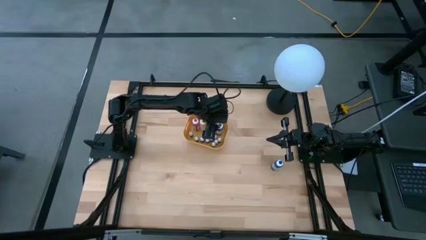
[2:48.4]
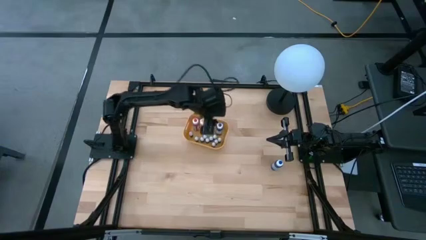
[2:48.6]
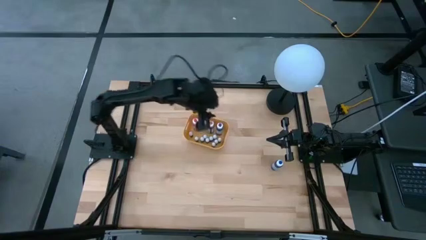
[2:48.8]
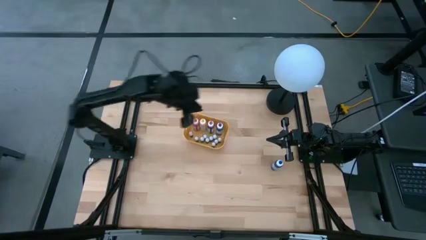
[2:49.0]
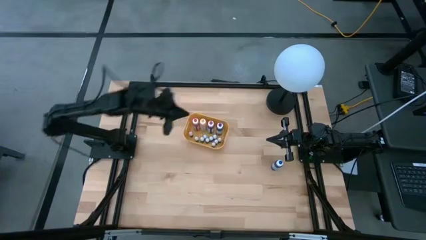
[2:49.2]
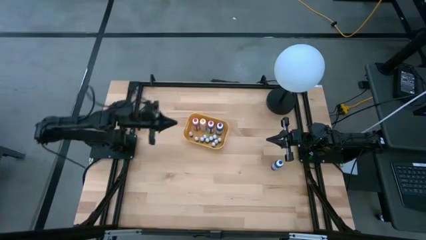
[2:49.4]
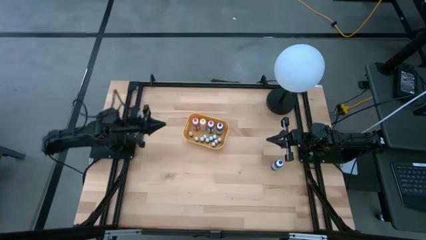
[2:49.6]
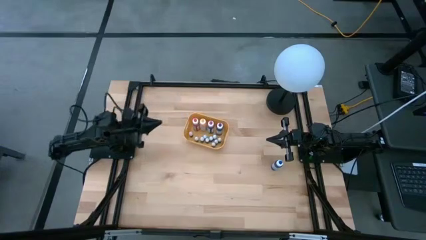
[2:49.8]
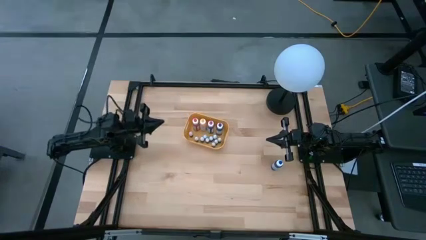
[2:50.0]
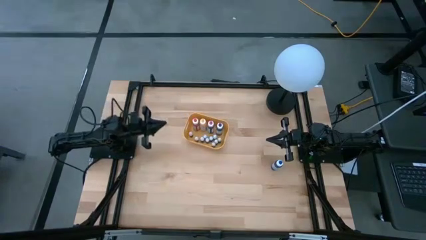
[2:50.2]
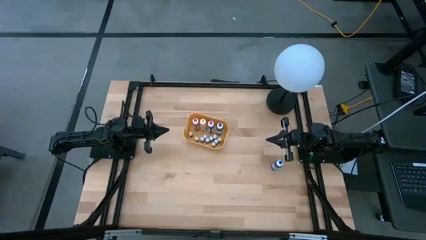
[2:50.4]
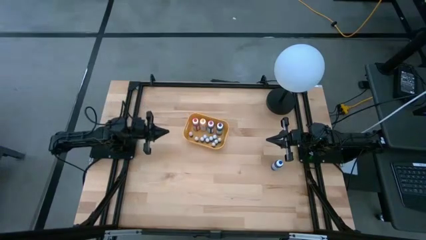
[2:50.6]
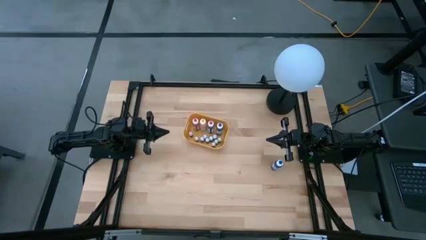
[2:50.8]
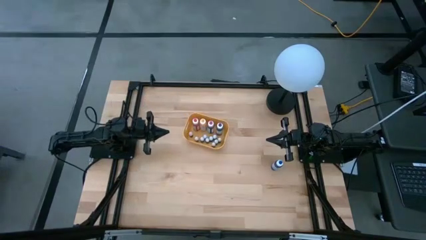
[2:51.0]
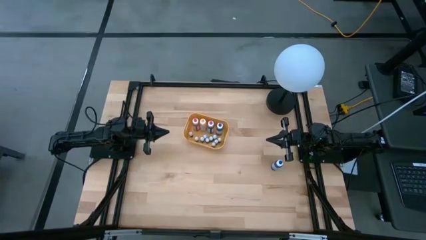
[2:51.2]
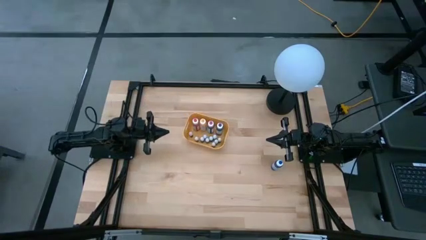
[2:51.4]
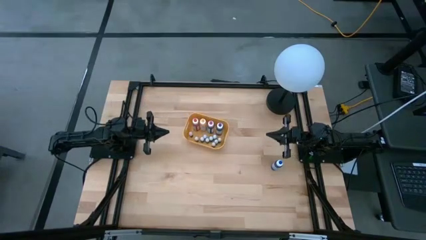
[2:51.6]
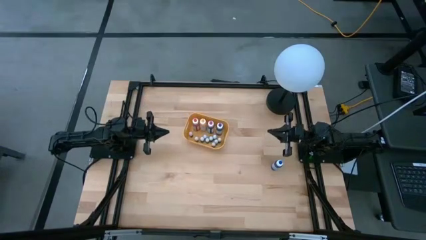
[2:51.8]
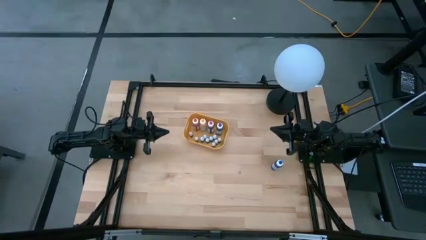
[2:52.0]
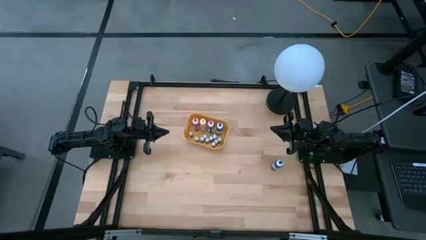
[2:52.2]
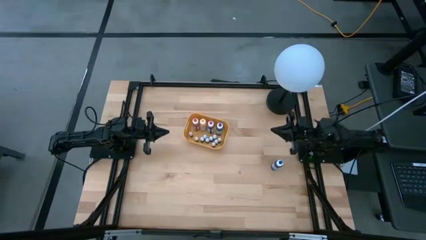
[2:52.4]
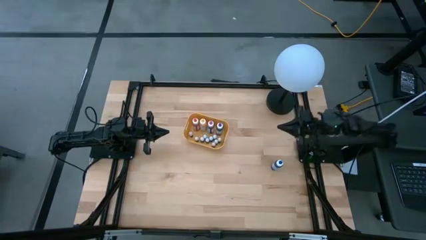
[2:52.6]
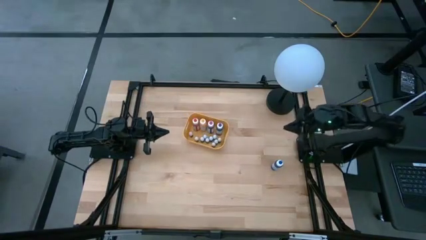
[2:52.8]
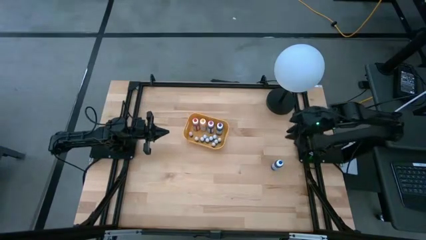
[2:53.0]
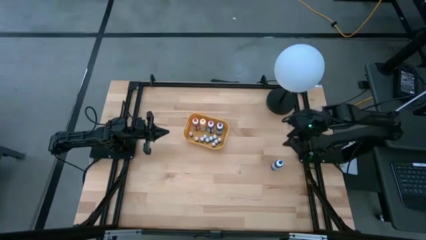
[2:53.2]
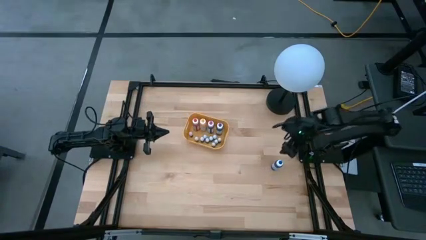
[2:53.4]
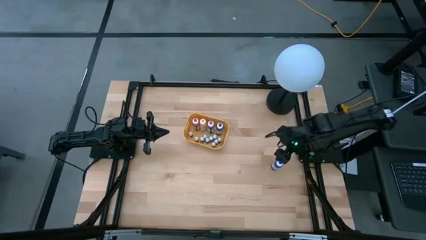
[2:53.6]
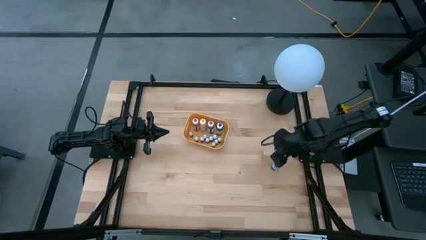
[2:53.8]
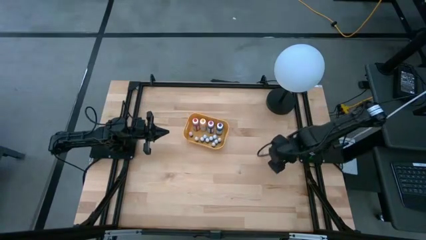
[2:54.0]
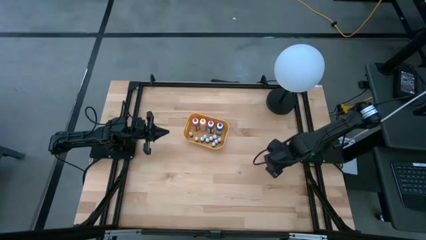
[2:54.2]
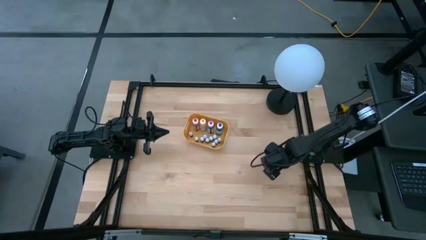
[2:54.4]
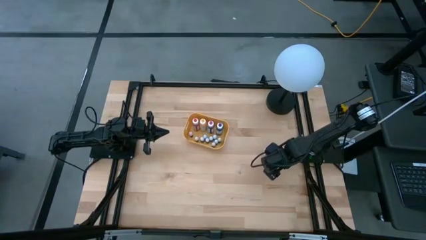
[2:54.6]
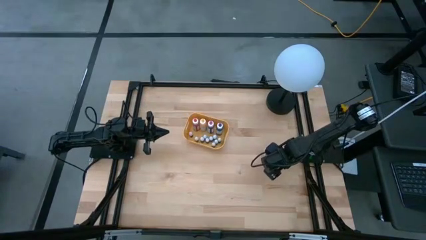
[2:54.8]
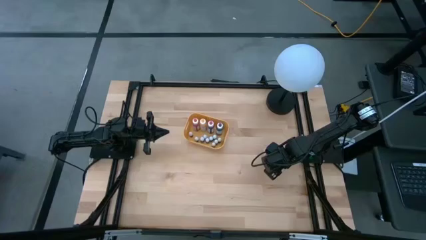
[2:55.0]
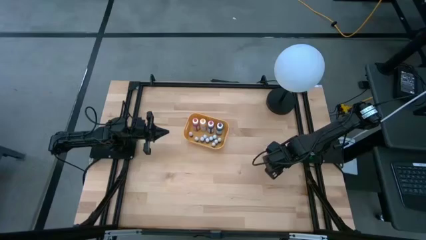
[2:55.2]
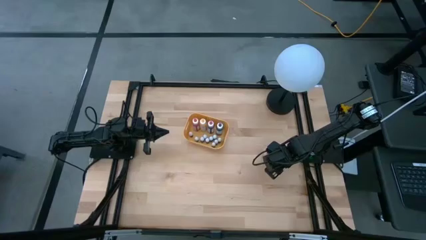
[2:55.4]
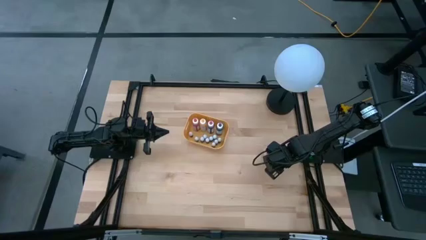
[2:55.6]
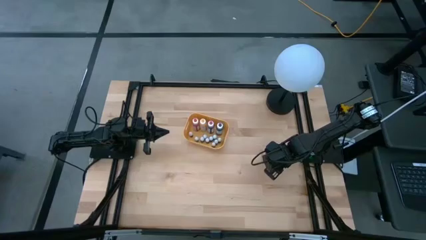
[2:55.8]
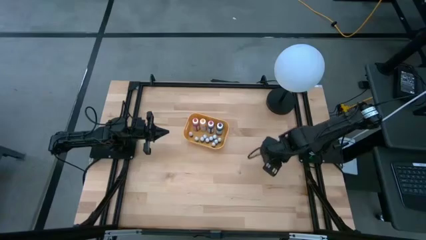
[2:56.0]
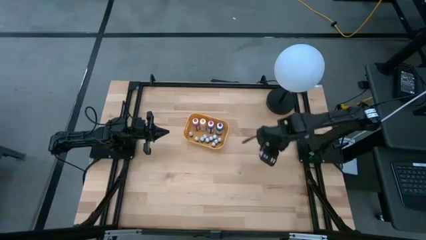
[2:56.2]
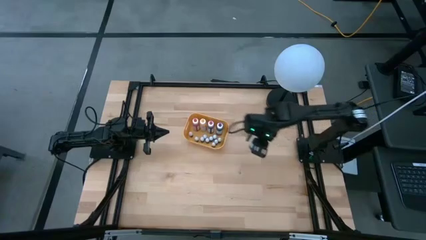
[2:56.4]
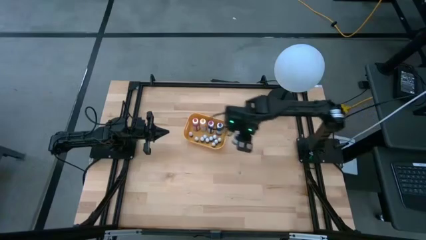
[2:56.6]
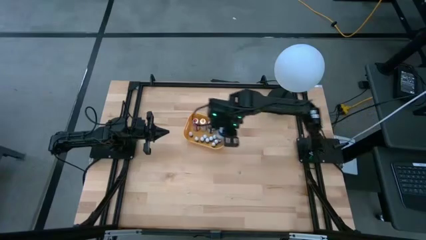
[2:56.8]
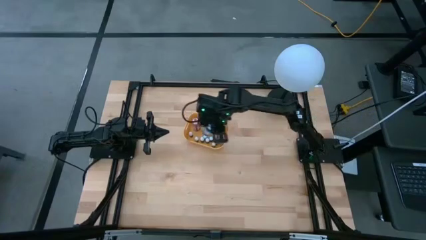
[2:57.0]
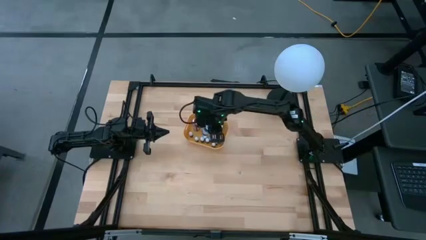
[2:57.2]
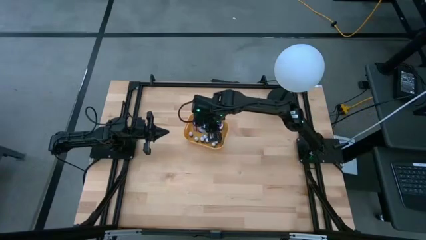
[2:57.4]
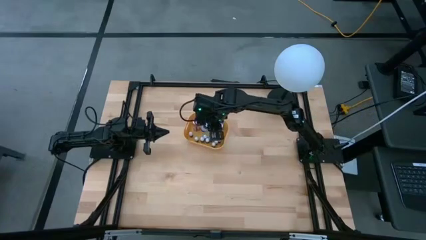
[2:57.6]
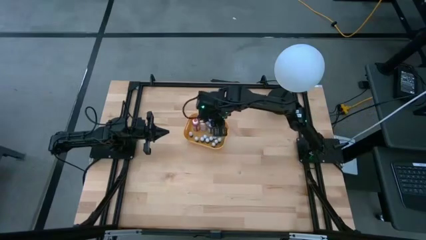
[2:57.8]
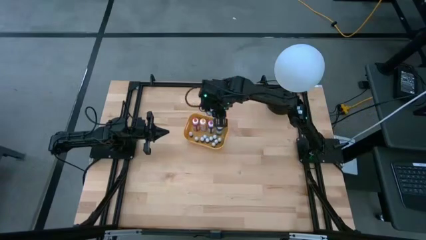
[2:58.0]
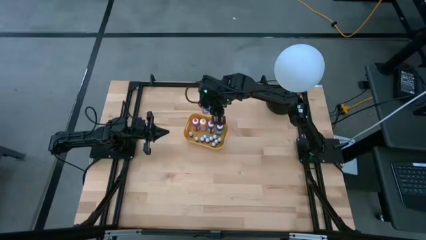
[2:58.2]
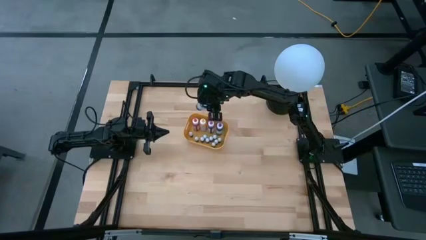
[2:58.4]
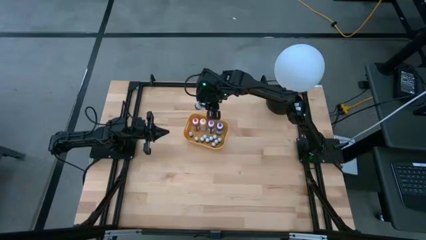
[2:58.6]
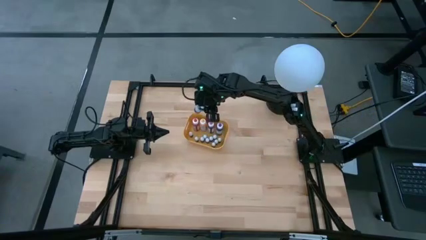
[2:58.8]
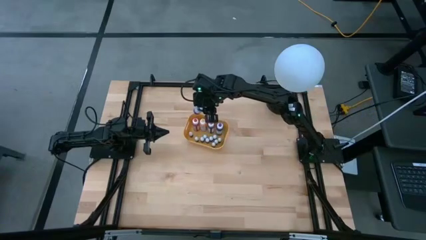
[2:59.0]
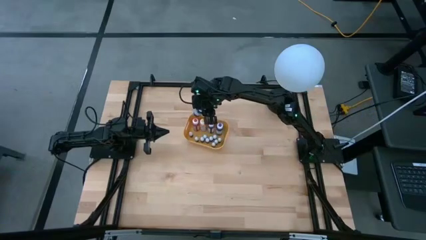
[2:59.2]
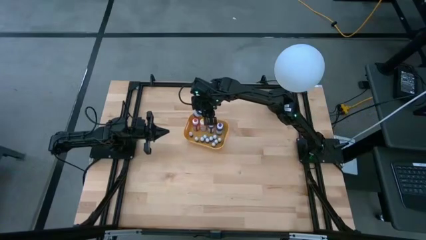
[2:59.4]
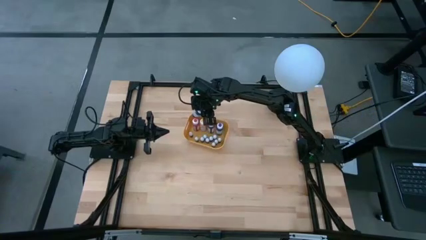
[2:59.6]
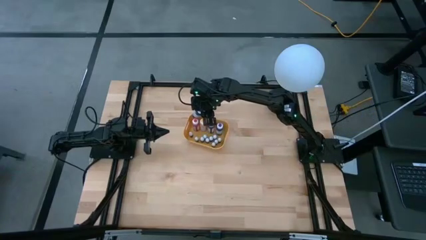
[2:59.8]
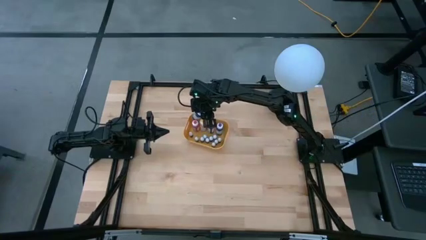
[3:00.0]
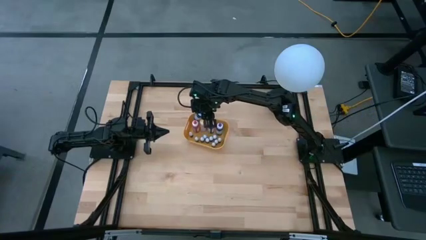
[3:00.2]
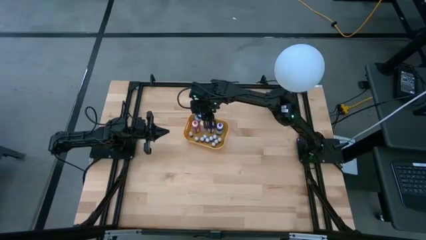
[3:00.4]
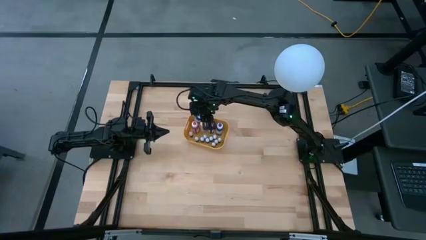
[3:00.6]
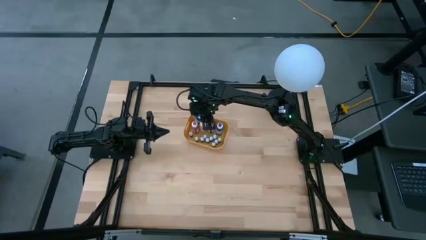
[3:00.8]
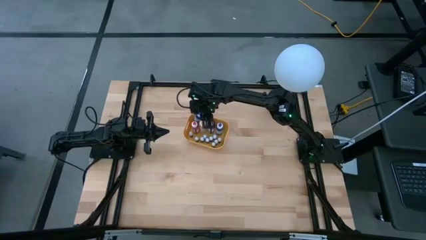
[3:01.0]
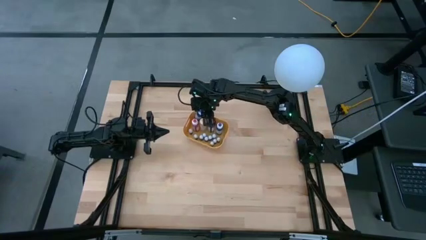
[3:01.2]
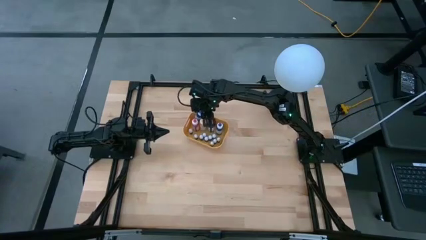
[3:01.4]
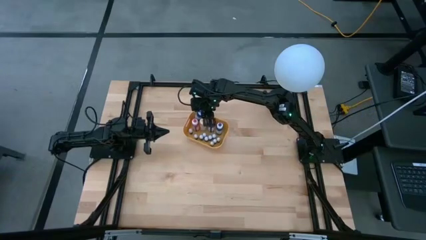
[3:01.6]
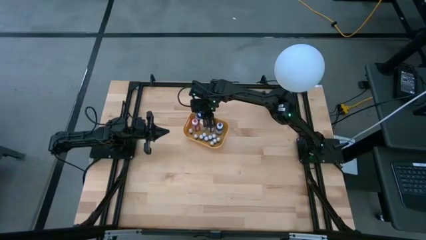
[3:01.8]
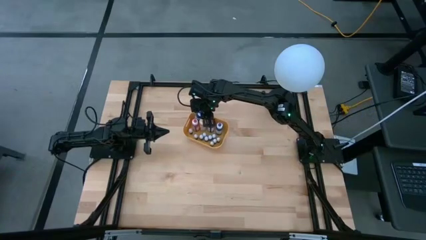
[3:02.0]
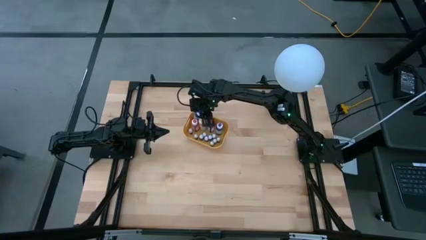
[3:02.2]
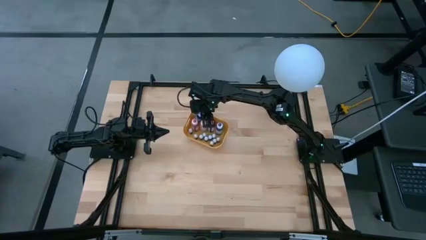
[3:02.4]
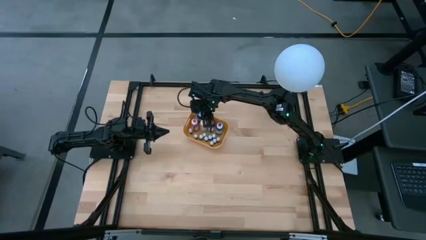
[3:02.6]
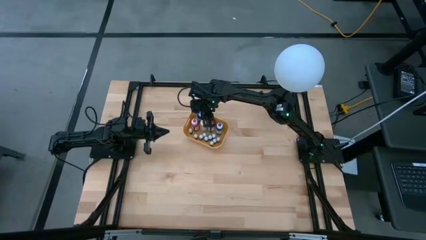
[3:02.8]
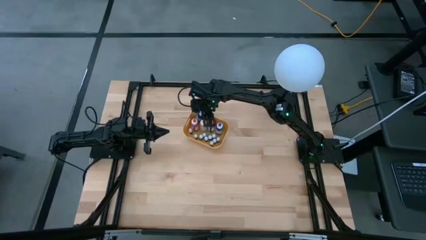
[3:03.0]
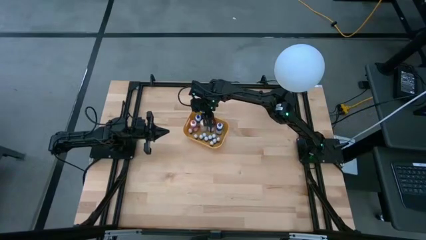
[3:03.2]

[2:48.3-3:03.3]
Task: Pick & Place food coloring
Put the large blue food coloring bottle into the yellow bin

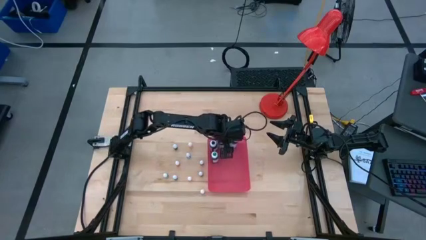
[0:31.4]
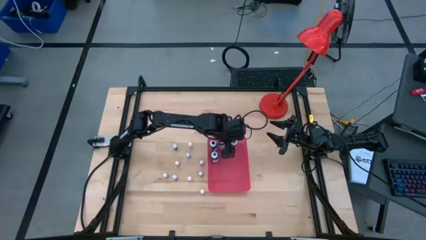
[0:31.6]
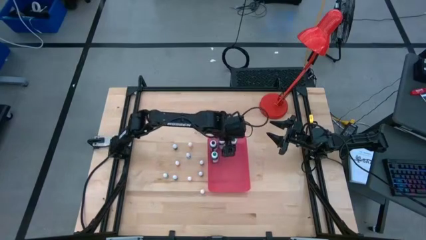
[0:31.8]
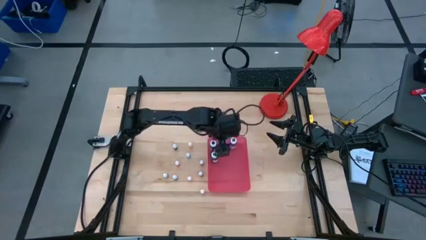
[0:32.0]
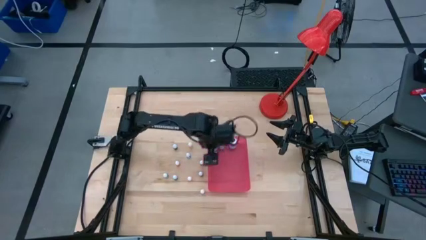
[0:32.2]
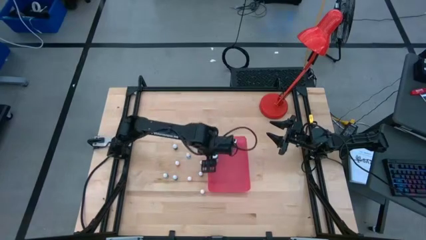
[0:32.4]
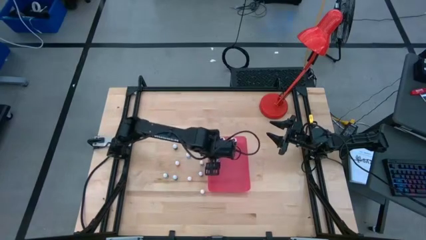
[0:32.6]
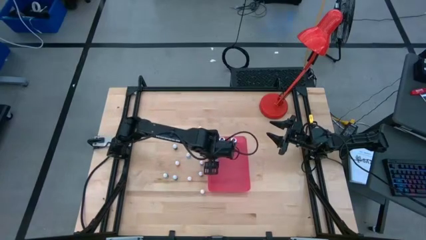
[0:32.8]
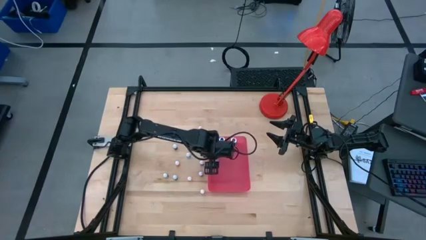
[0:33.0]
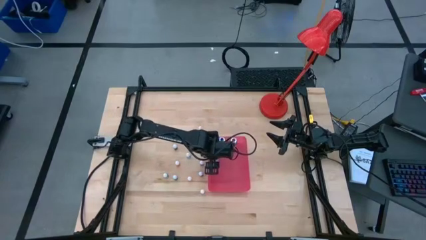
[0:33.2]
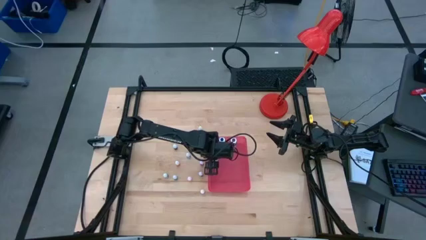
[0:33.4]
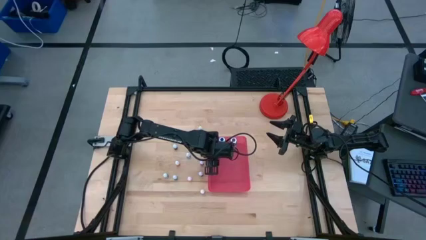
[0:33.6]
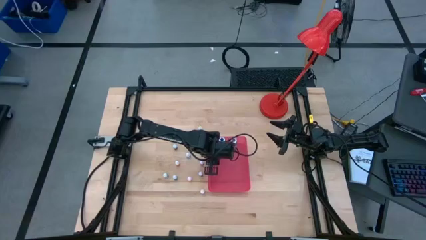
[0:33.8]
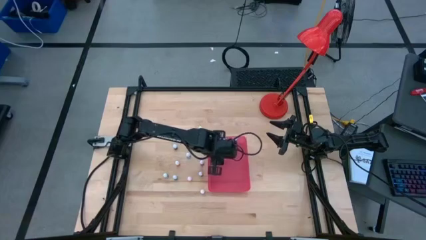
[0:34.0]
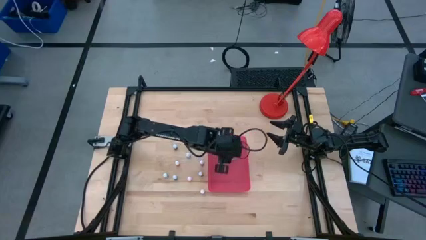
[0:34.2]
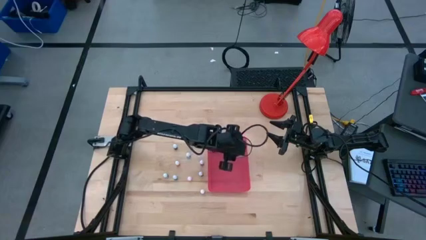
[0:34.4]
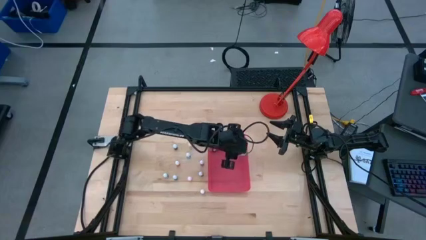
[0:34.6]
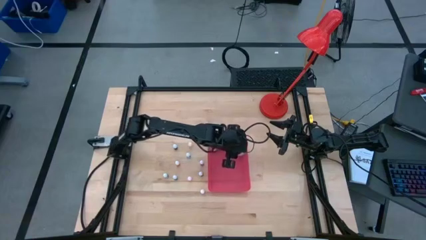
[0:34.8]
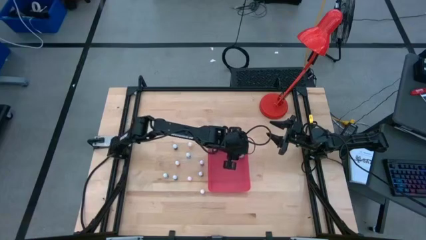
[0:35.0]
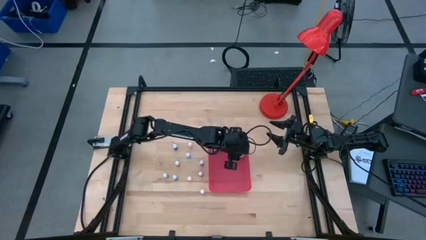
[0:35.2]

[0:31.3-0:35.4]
Task: Pick & Place food coloring
Adjust the big green food coloring bottle in the red bin
